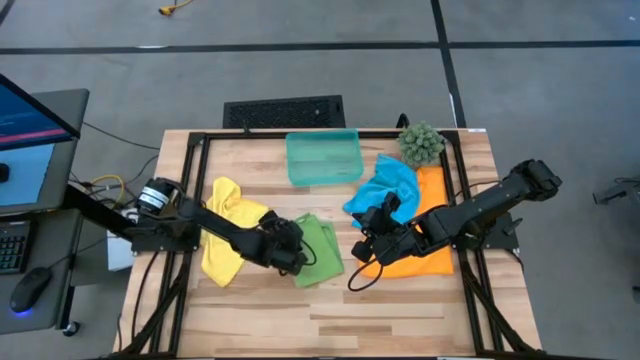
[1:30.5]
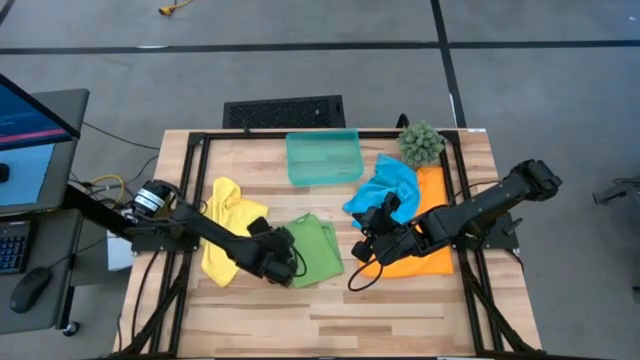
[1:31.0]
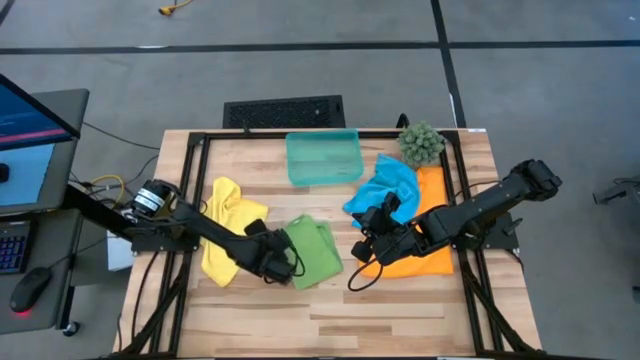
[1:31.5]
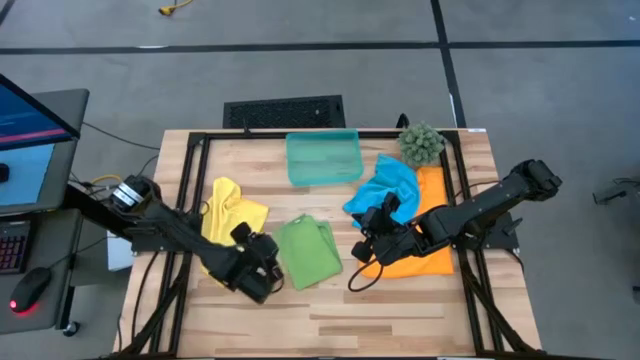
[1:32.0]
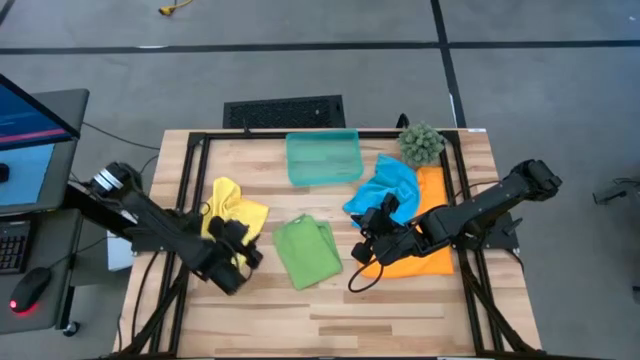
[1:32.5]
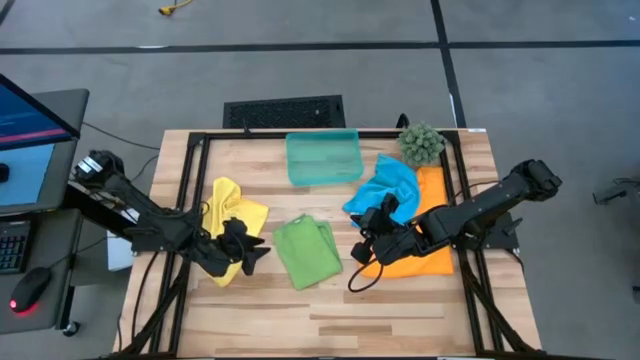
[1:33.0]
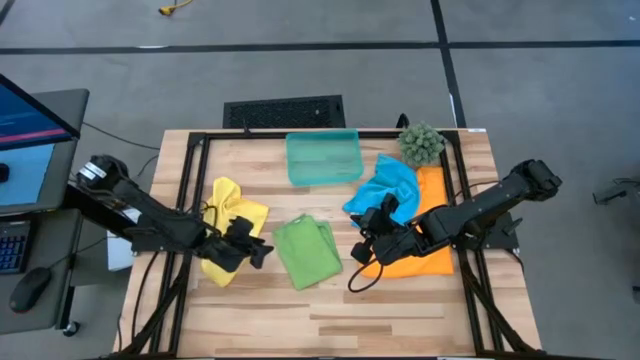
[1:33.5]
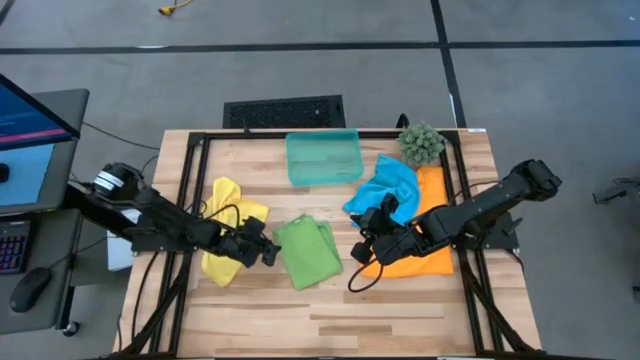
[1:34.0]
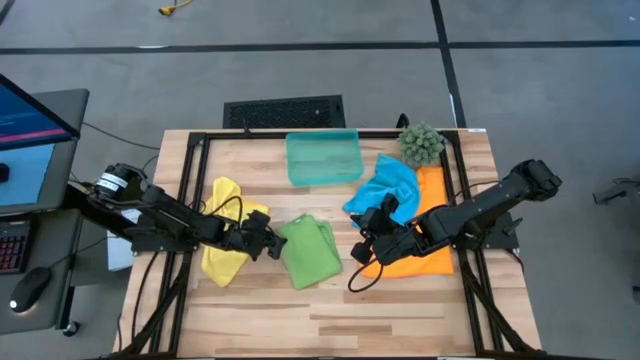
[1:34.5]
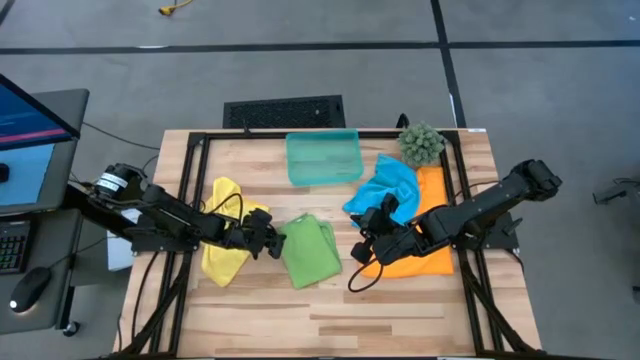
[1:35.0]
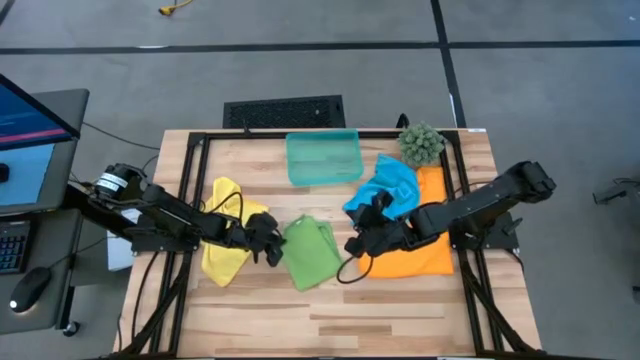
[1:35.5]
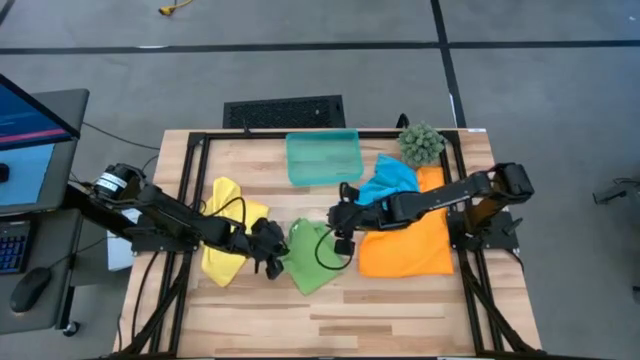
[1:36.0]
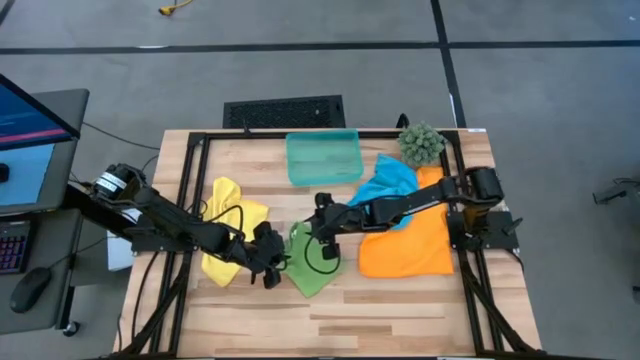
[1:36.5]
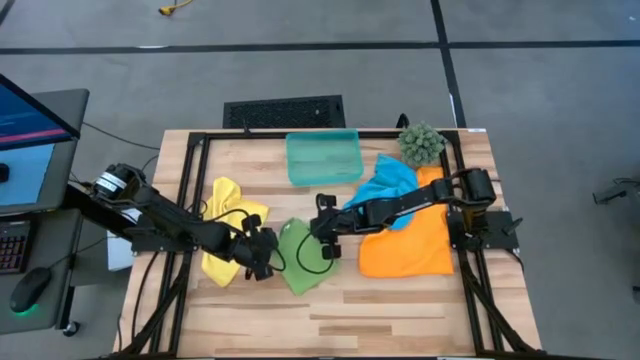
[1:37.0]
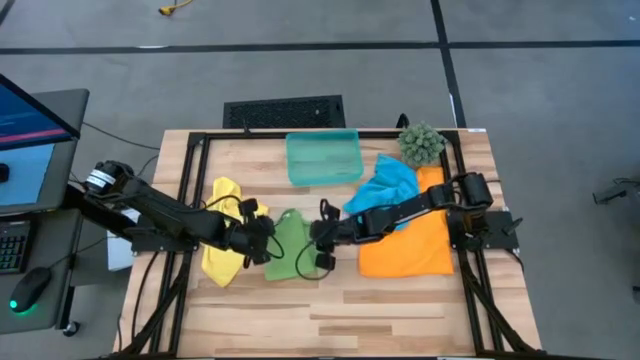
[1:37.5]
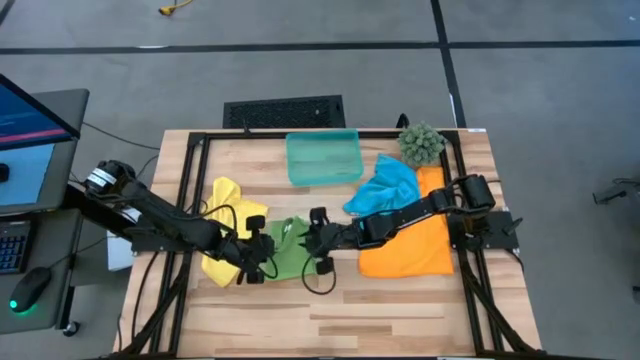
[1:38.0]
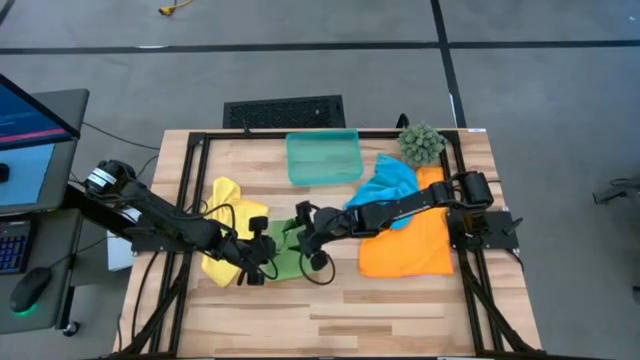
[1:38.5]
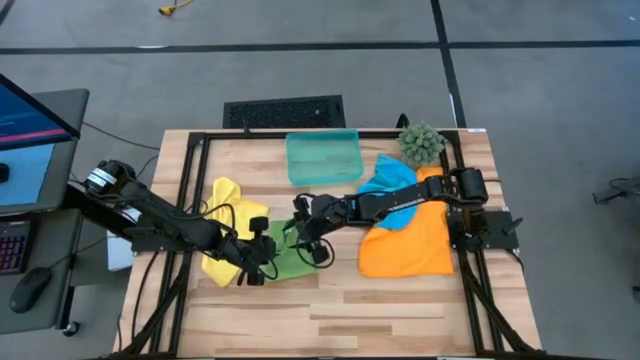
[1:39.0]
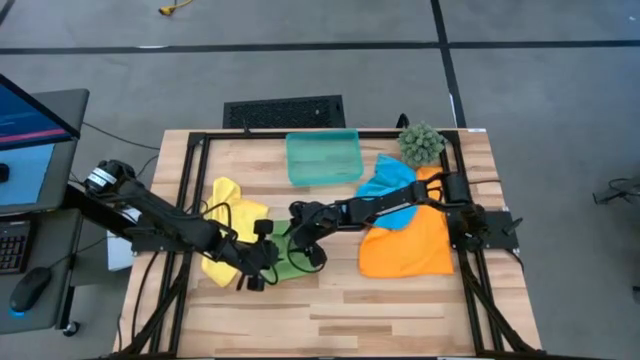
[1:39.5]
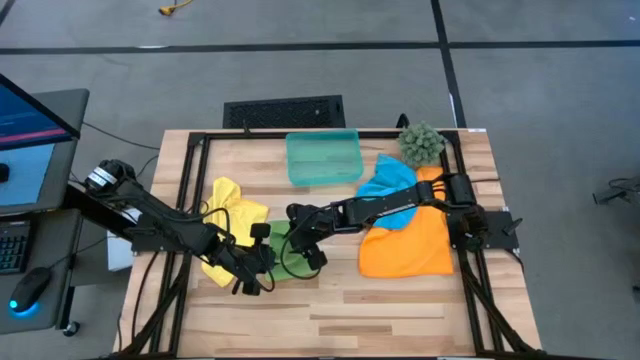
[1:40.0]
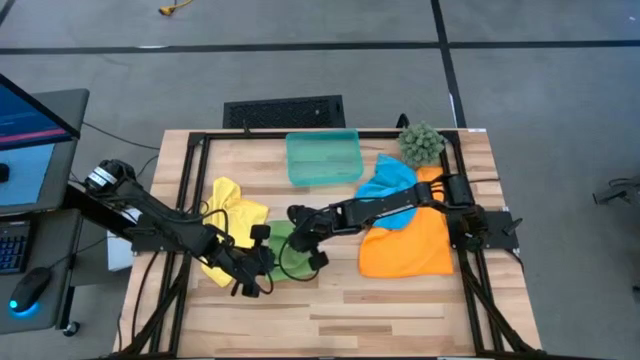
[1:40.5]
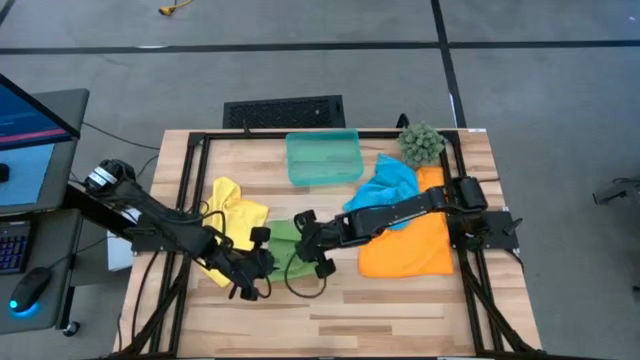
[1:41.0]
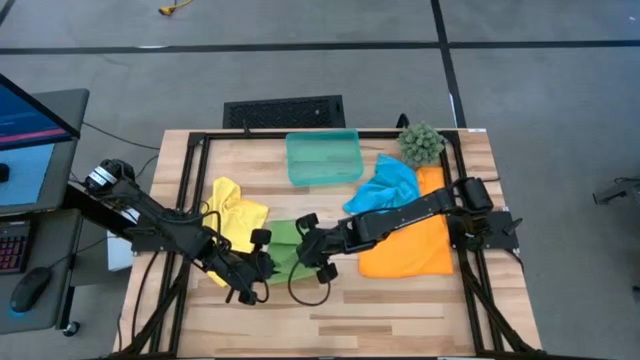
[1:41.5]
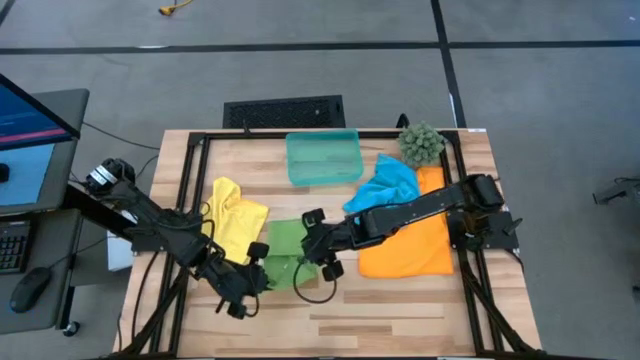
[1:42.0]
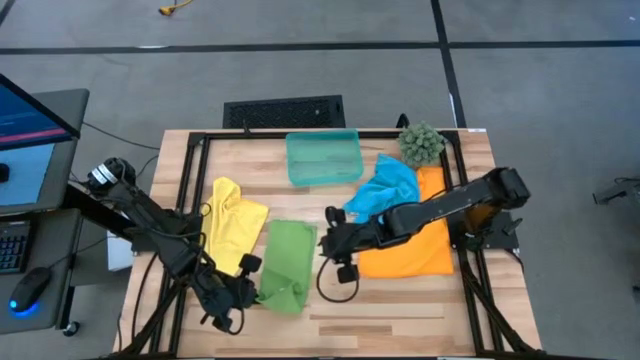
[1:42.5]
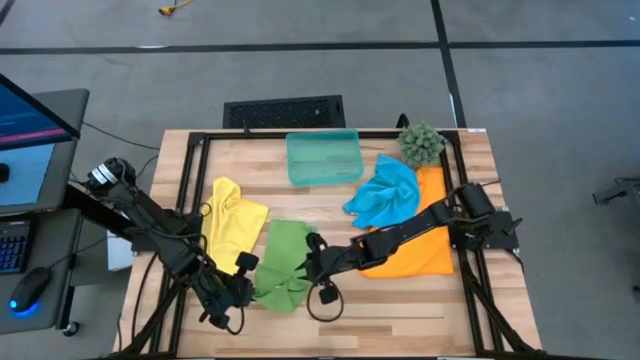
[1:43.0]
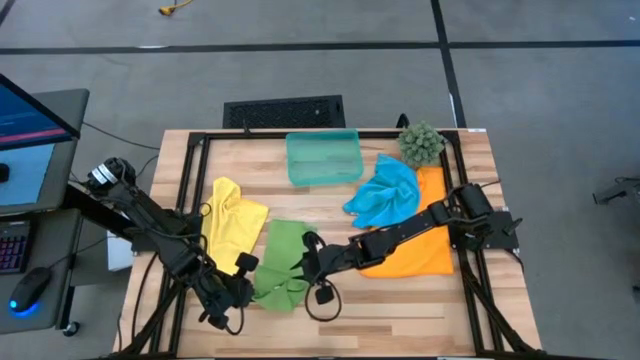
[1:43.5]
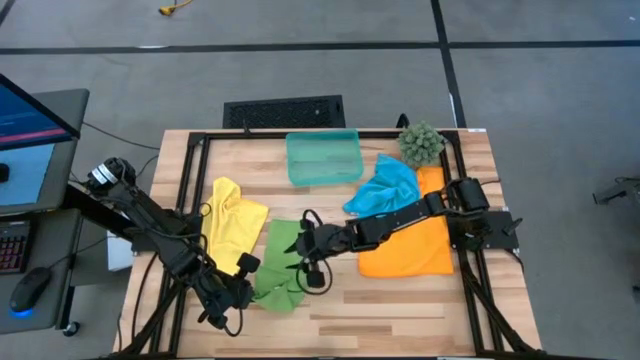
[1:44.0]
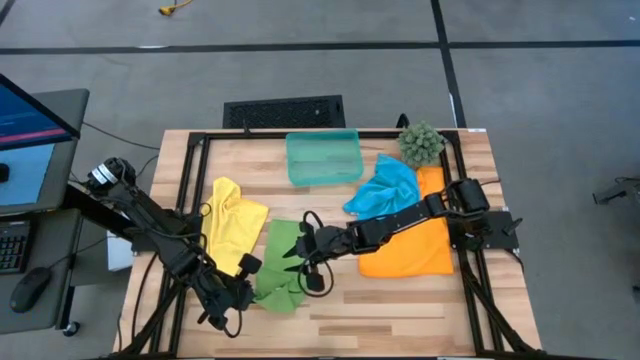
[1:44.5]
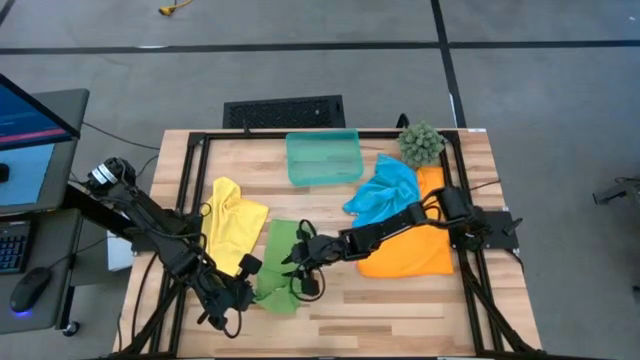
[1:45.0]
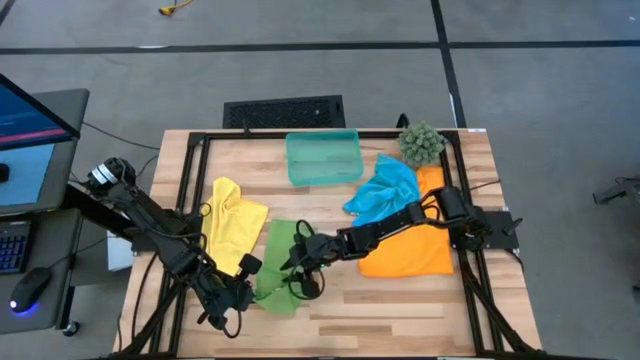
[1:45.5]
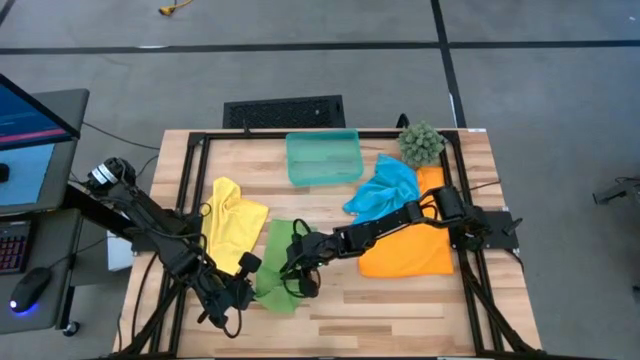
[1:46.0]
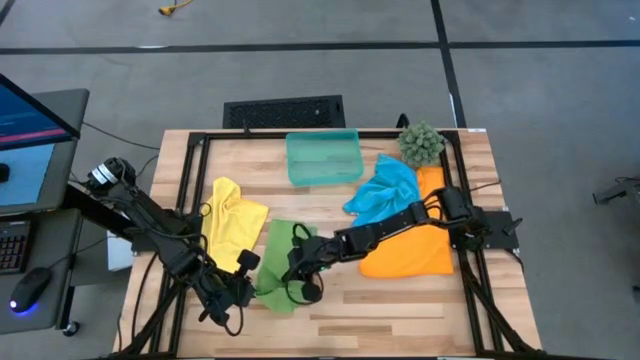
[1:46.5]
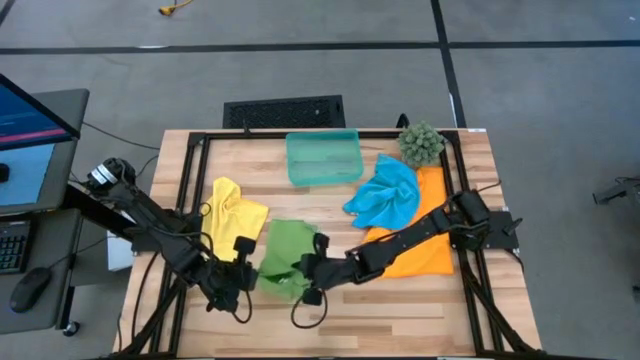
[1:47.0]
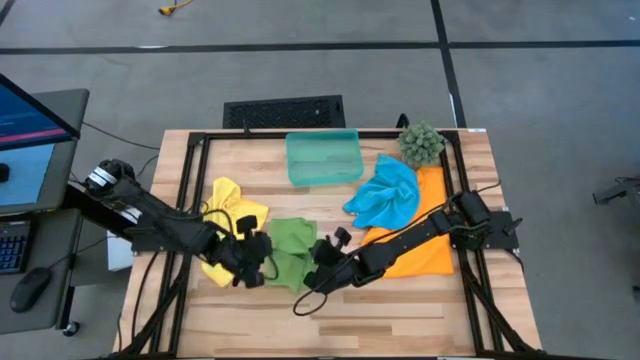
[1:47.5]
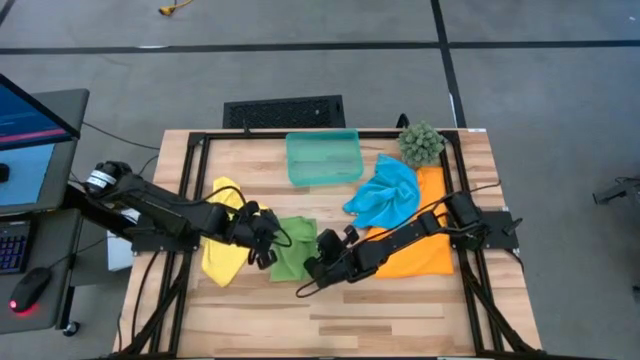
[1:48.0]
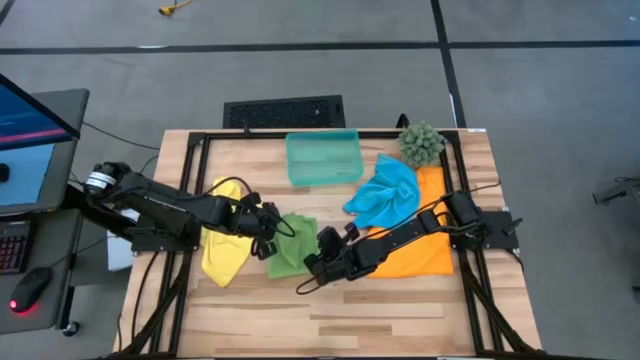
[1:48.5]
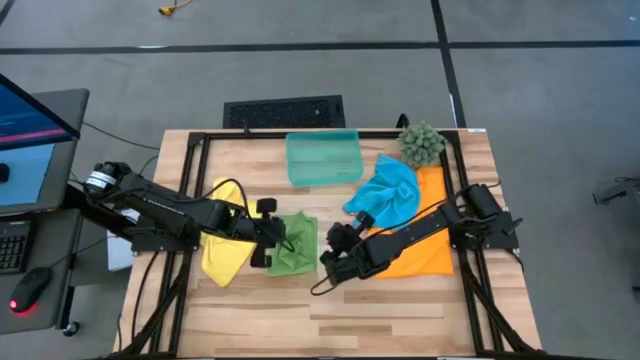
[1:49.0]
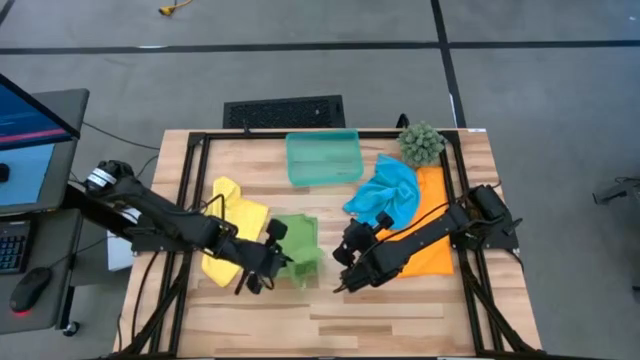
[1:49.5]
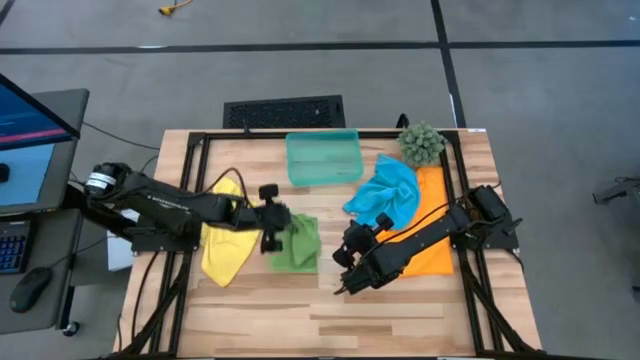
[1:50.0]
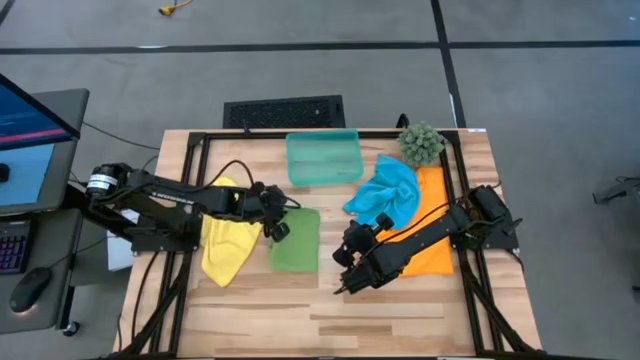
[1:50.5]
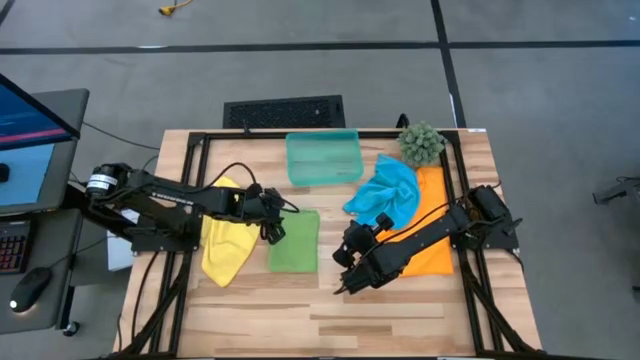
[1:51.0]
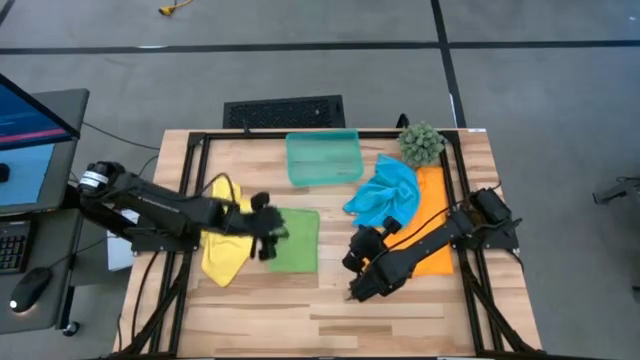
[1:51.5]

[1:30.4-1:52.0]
Task: Roll microfiber towels into tight, uniform cylinder then place into a basket
Roll the green microfiber cloth
